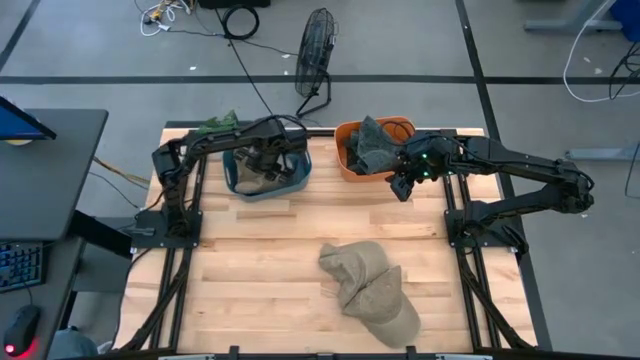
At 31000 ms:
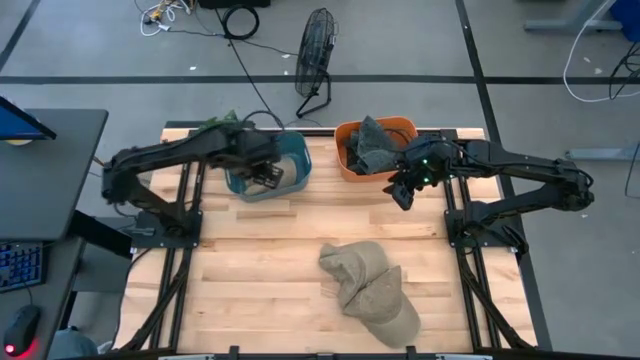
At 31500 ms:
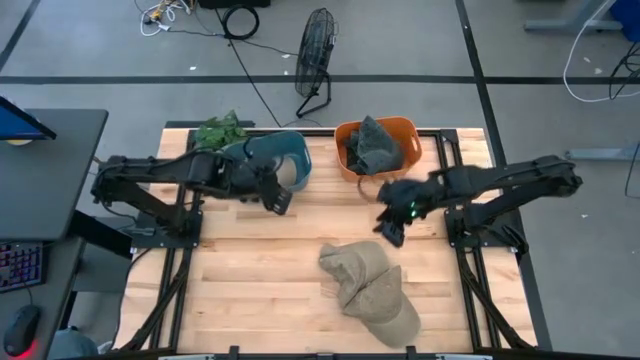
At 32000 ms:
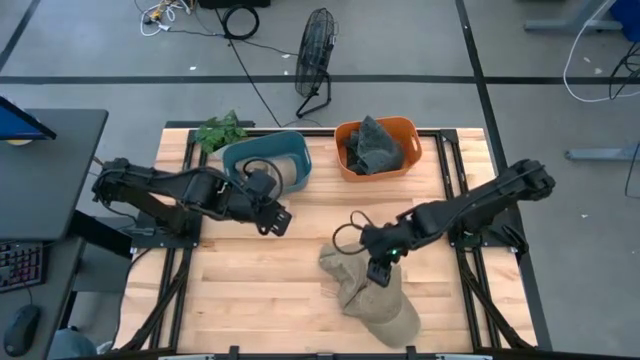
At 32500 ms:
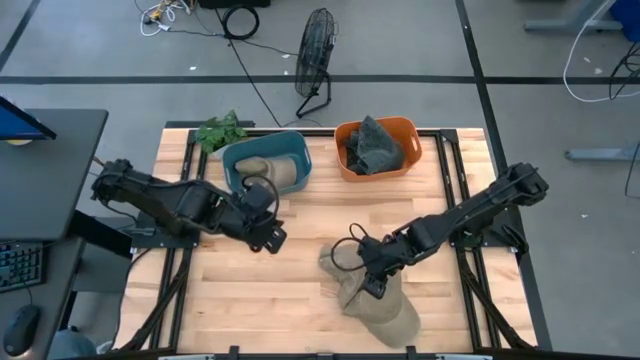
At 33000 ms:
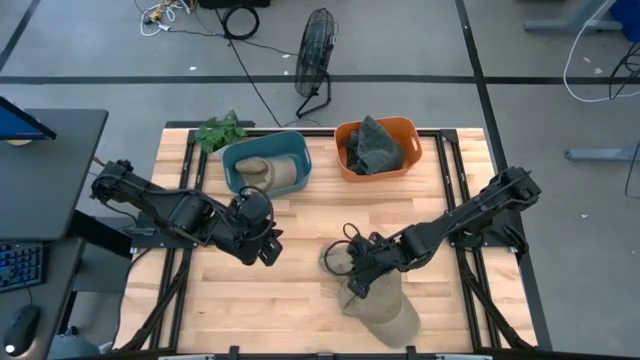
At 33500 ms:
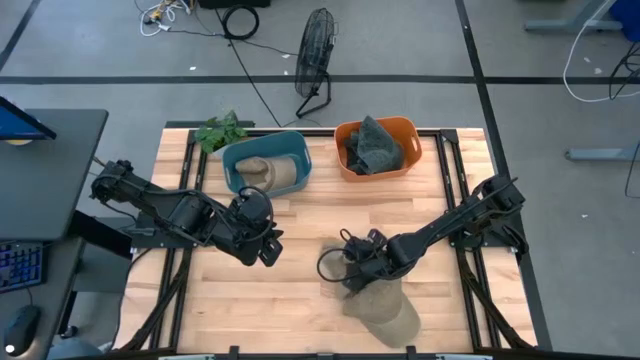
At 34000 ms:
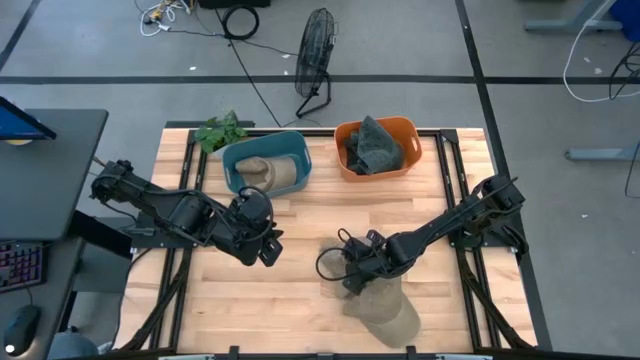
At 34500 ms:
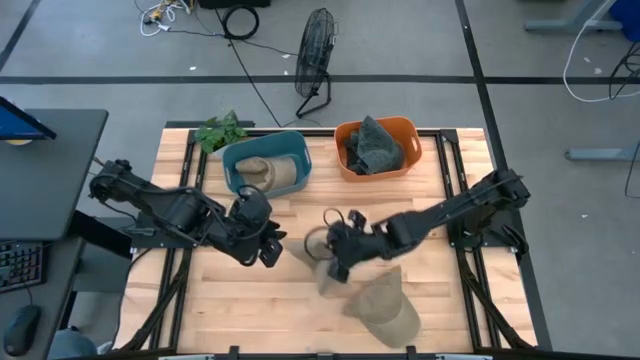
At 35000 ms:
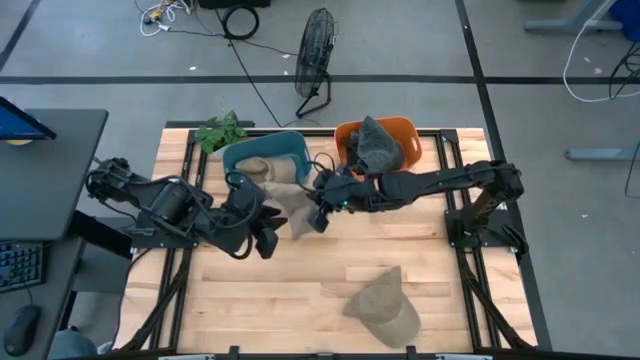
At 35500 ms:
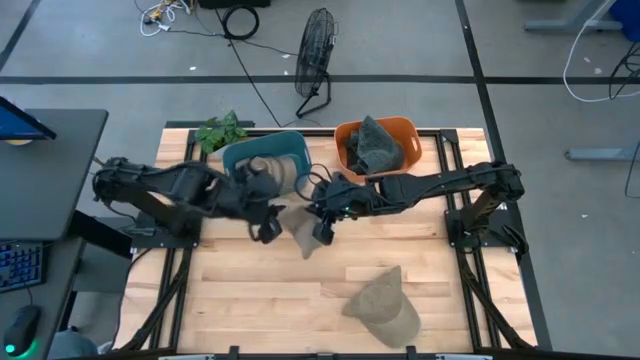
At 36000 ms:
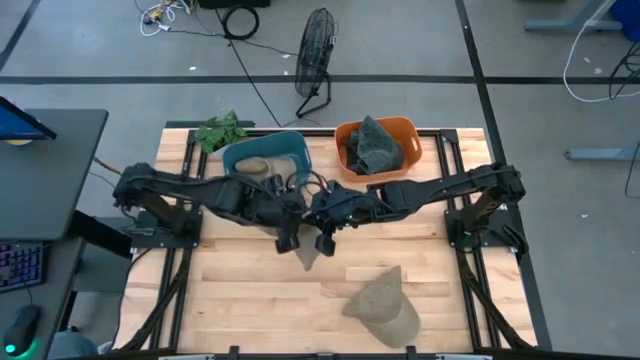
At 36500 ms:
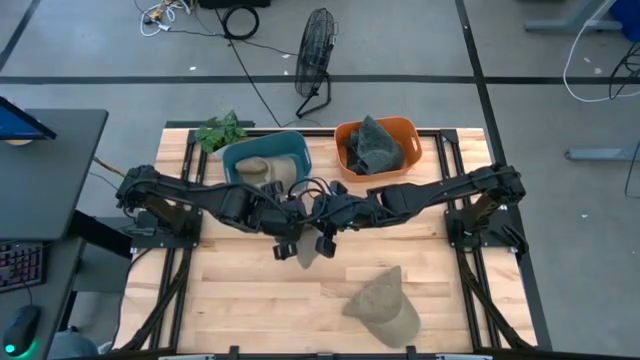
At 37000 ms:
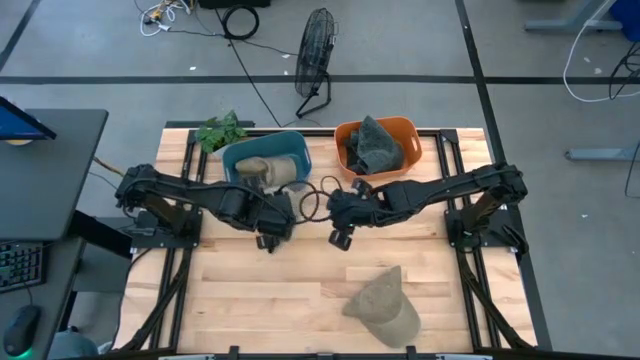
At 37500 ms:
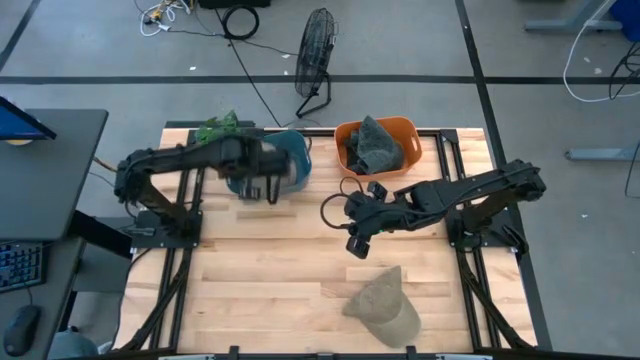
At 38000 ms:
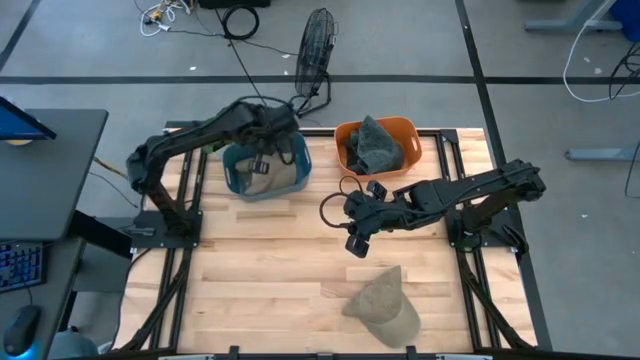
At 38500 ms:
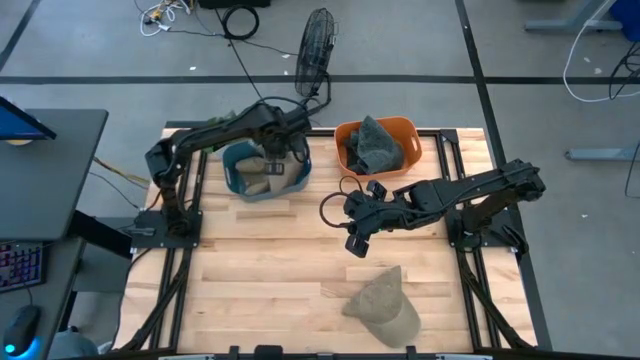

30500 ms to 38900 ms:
Task: Pick & Place hat
Put the top brown cap into the green bin

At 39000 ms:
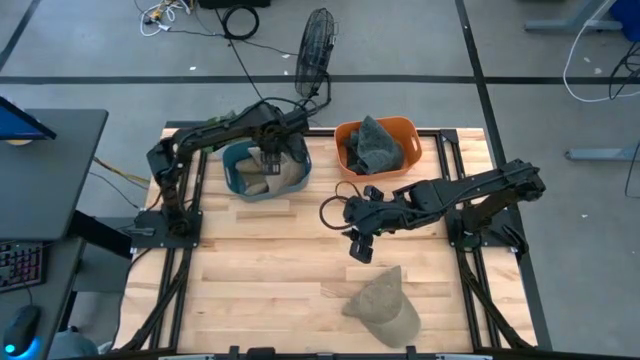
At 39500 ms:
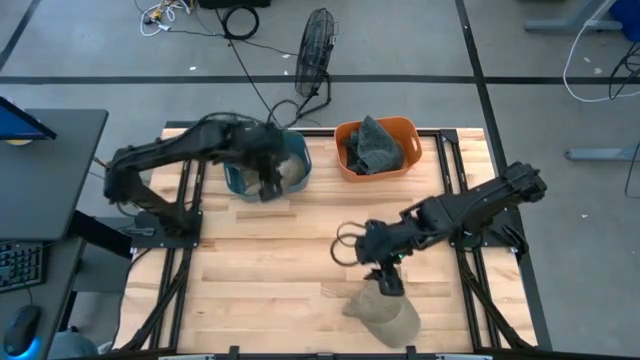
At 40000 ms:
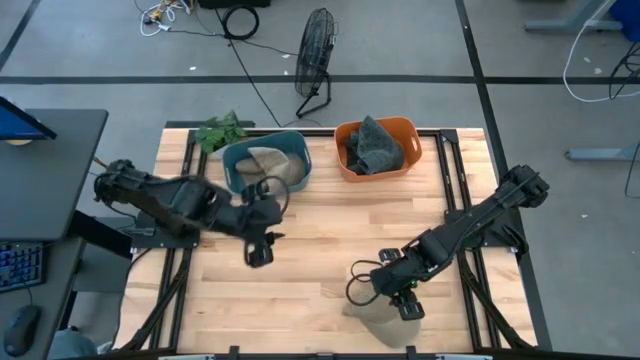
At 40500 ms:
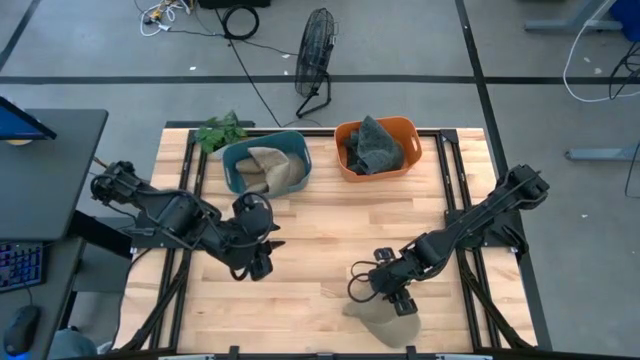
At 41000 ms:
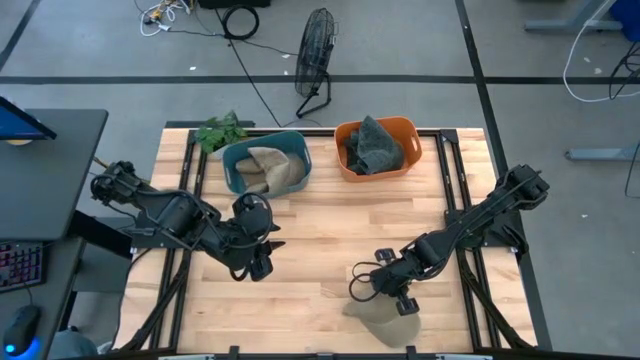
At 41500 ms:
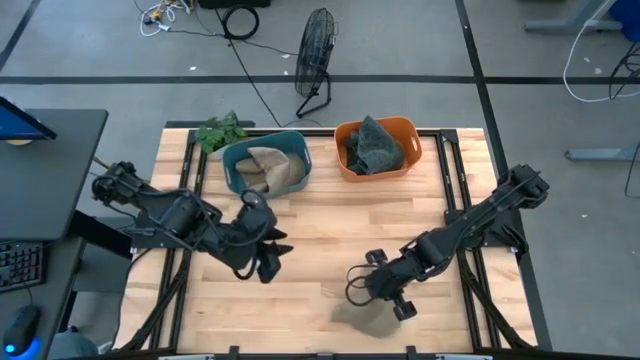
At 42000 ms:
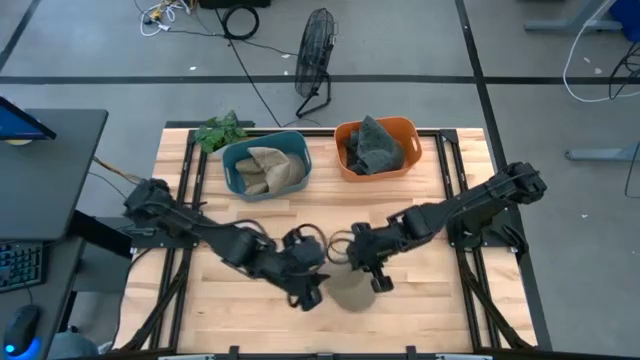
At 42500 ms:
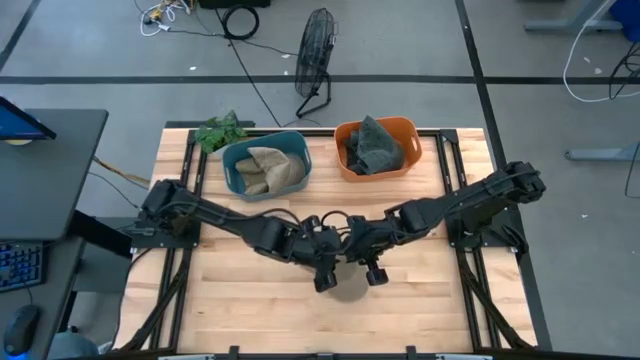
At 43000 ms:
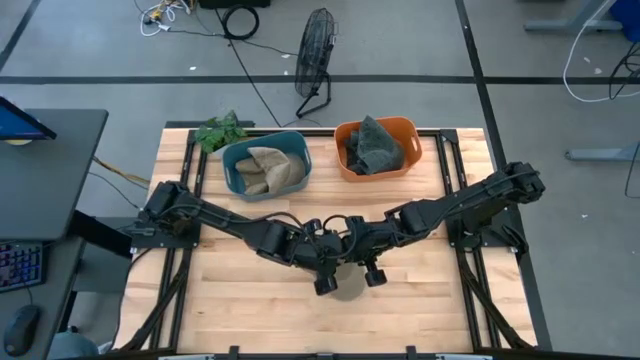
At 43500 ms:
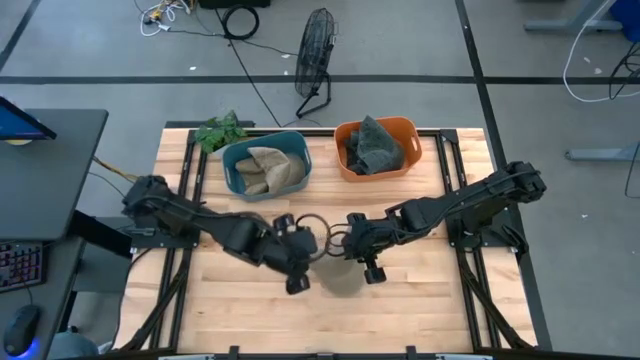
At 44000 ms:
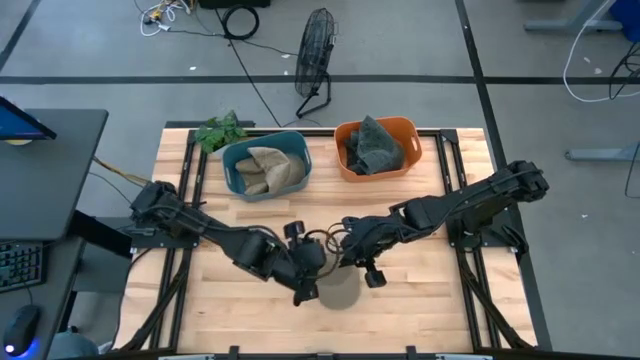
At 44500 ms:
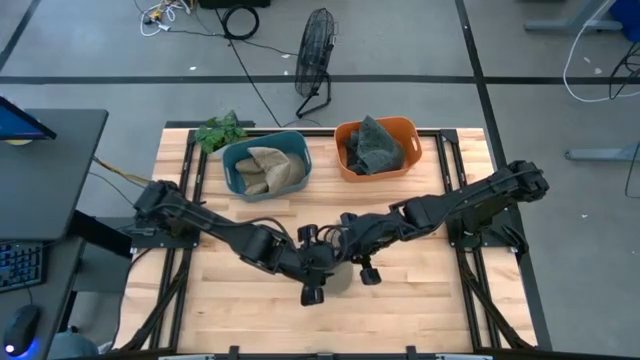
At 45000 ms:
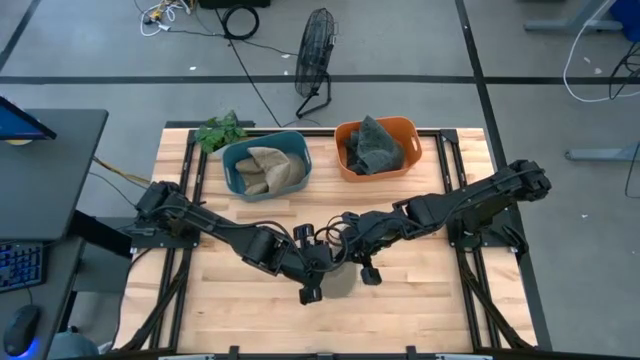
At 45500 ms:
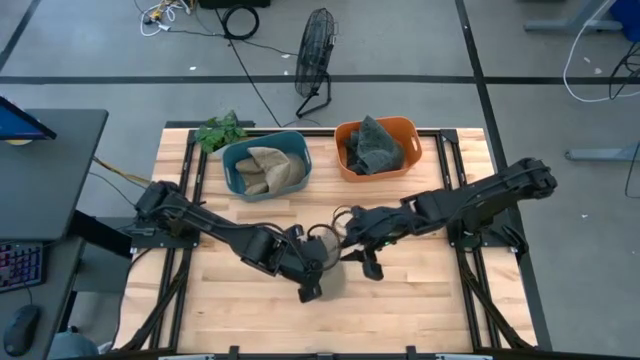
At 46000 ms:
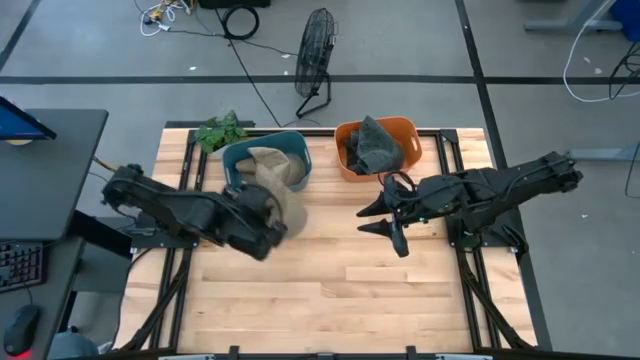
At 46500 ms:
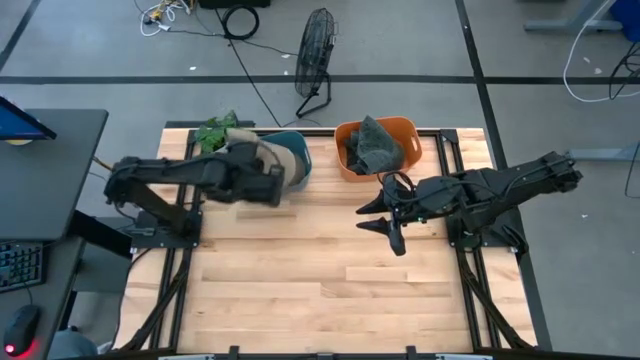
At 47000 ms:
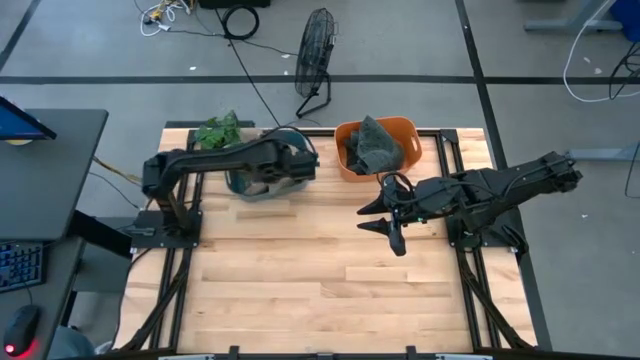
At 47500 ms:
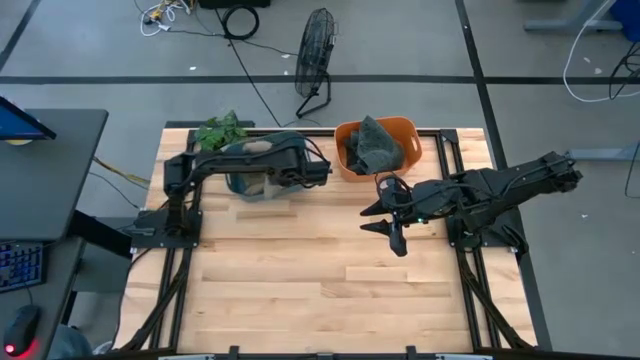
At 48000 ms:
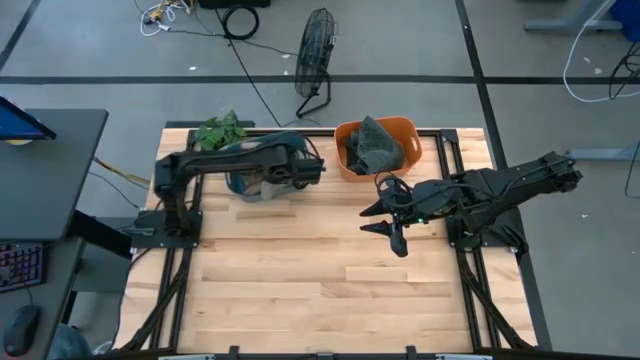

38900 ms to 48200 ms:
Put the brown cap into the green bin

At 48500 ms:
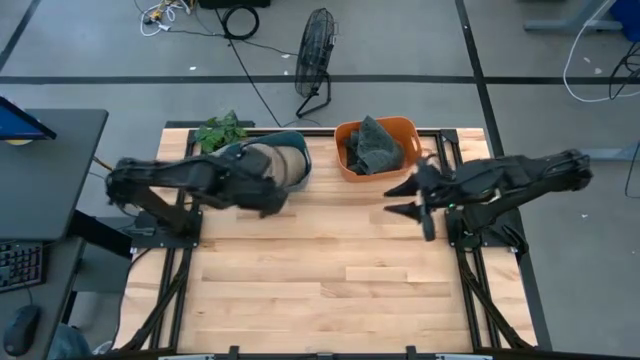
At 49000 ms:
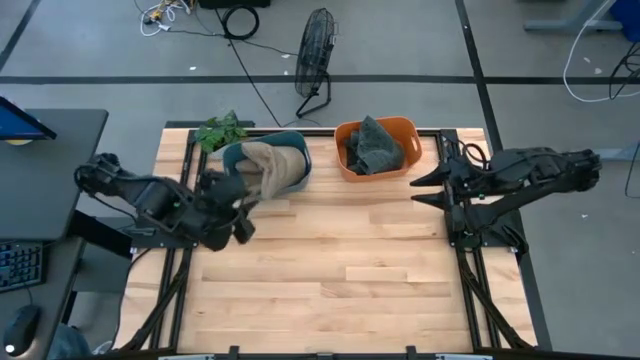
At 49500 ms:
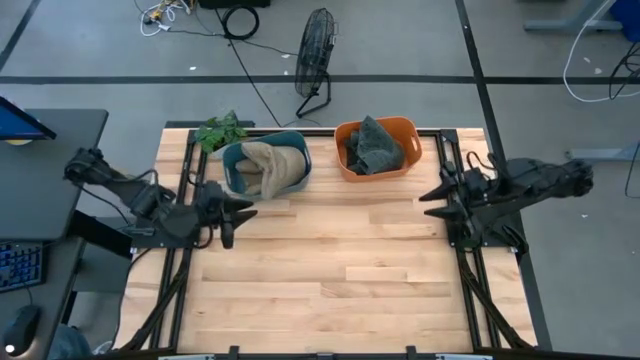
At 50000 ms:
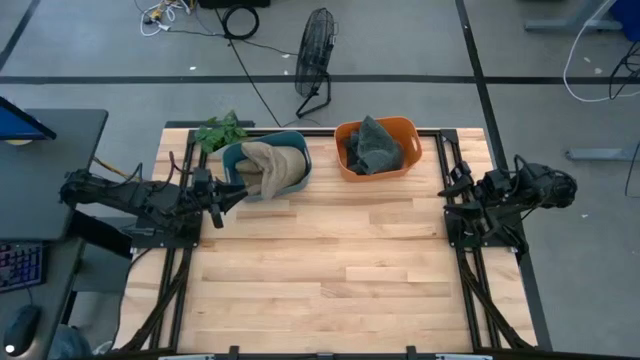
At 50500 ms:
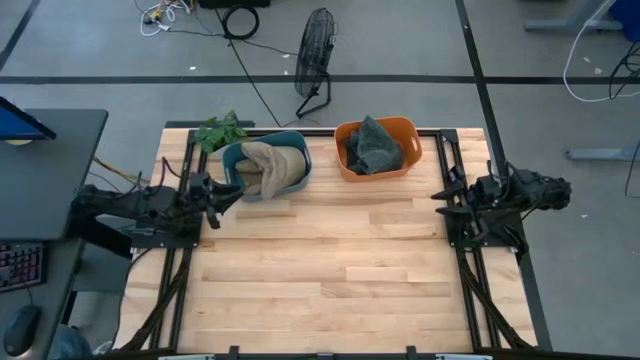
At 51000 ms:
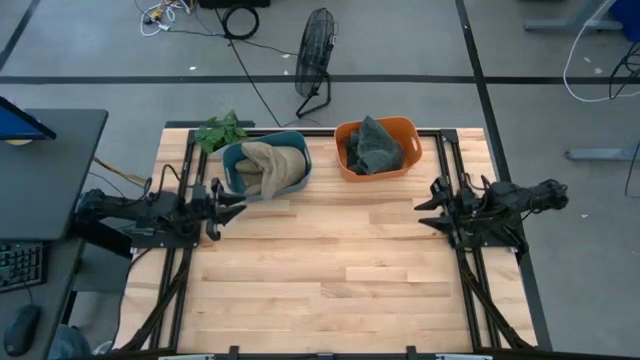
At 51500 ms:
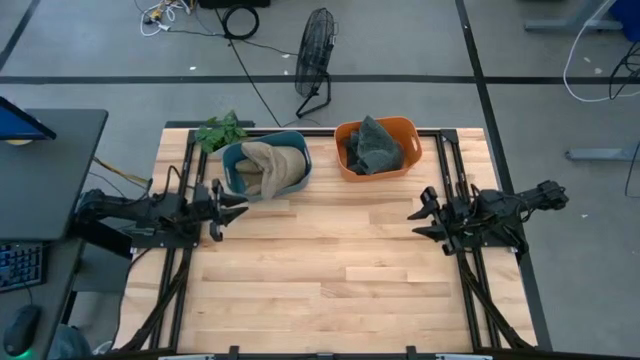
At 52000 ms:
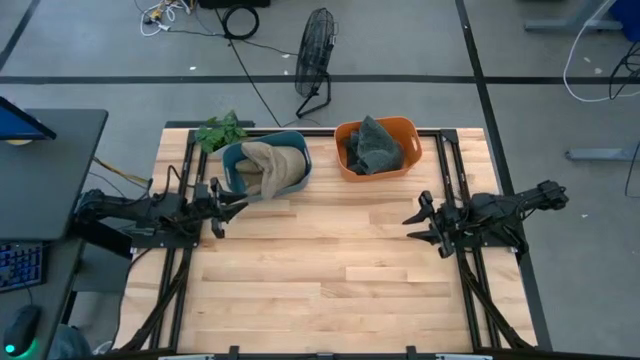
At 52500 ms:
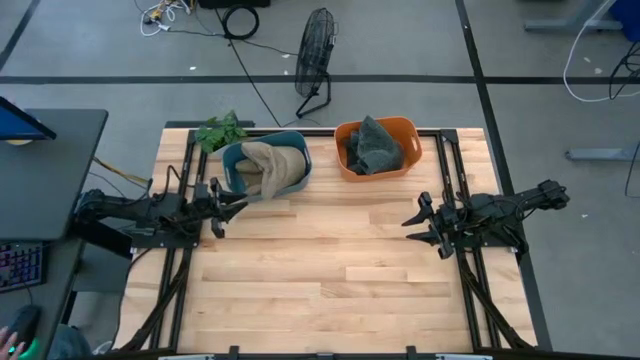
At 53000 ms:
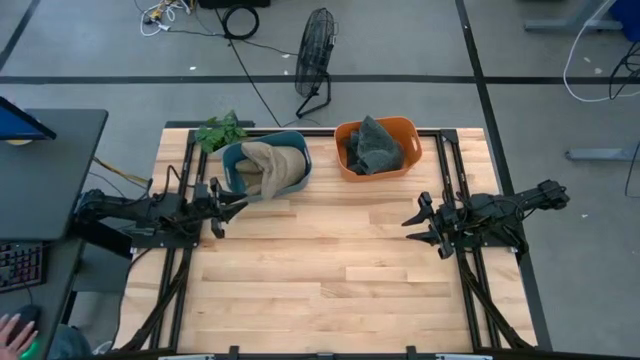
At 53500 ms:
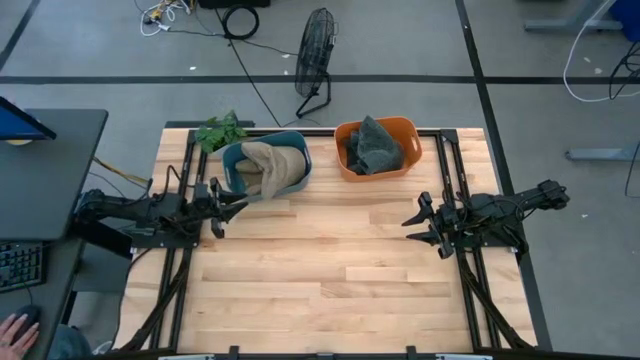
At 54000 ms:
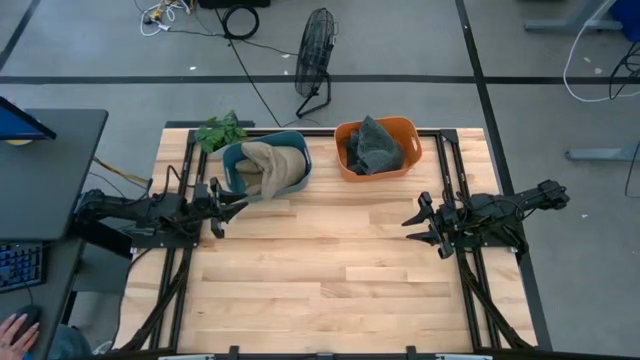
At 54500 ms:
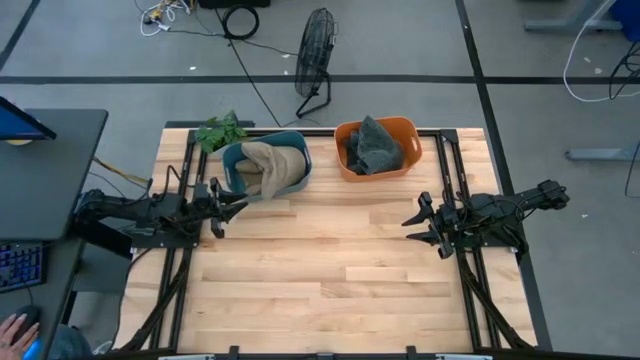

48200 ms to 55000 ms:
Return to Home Position
